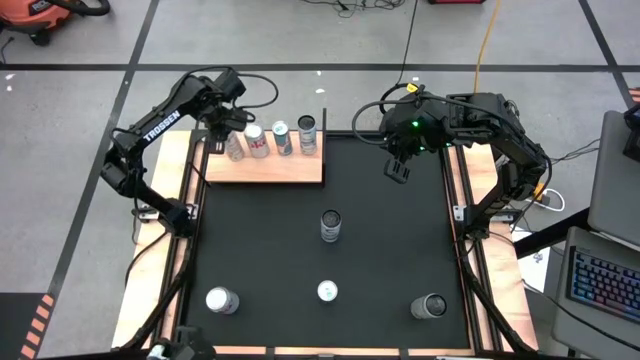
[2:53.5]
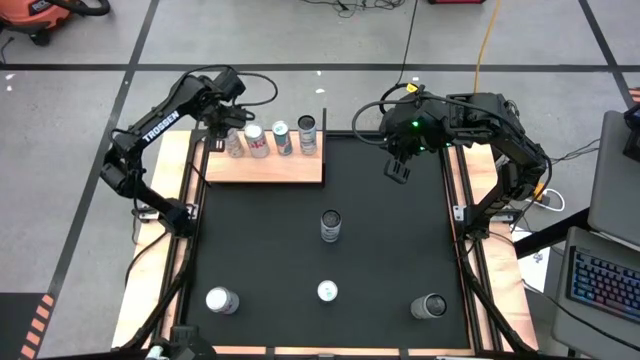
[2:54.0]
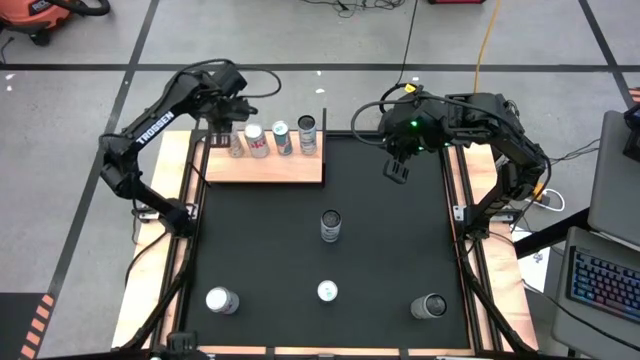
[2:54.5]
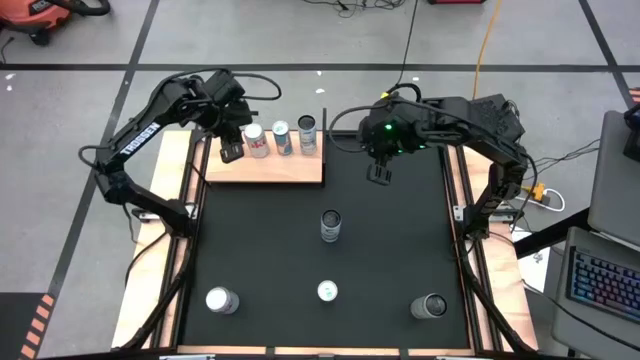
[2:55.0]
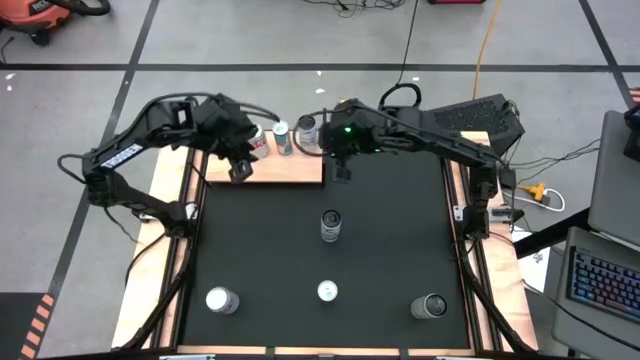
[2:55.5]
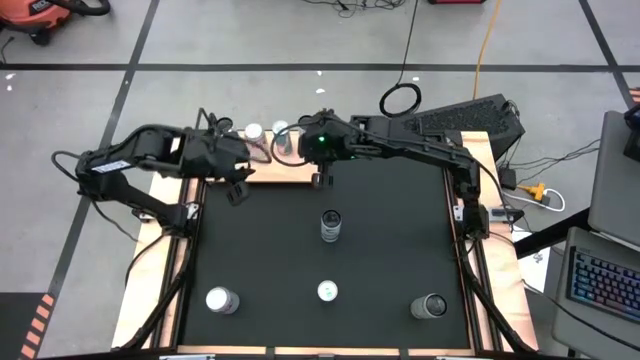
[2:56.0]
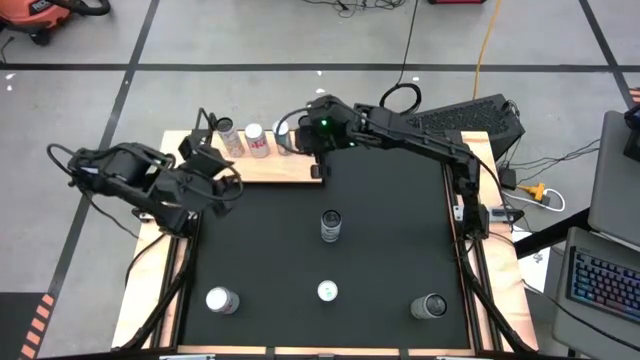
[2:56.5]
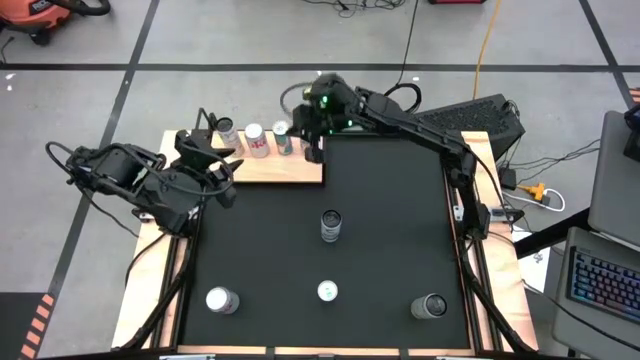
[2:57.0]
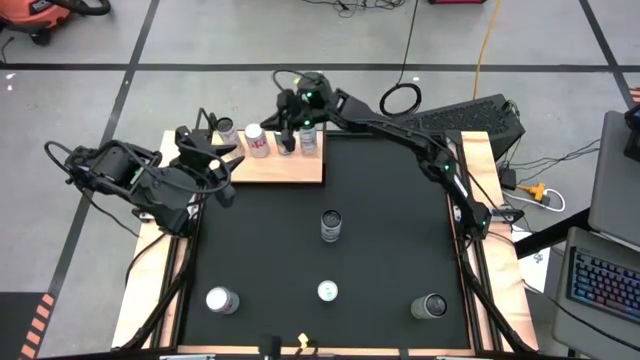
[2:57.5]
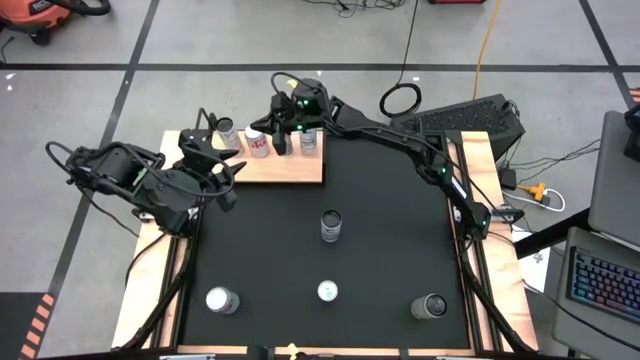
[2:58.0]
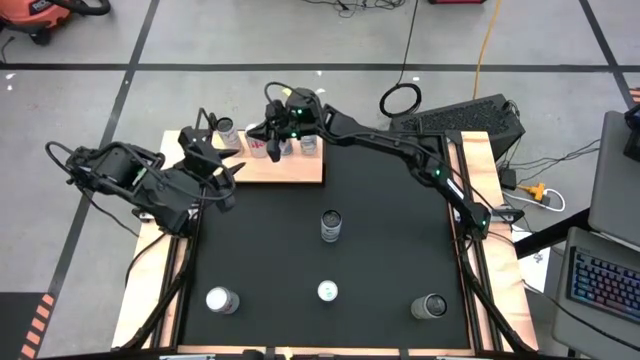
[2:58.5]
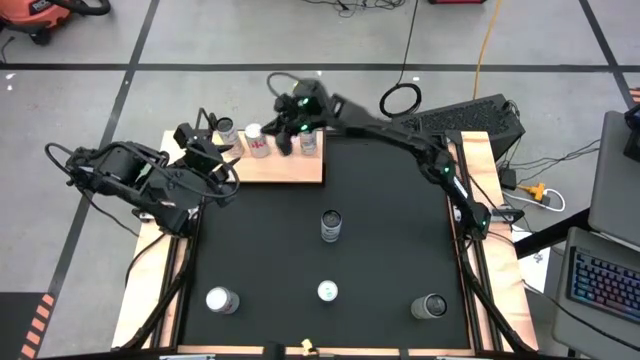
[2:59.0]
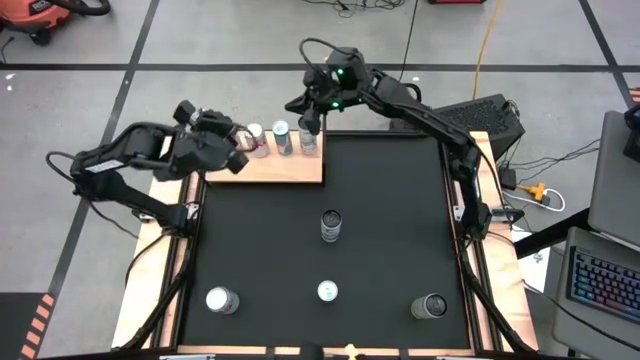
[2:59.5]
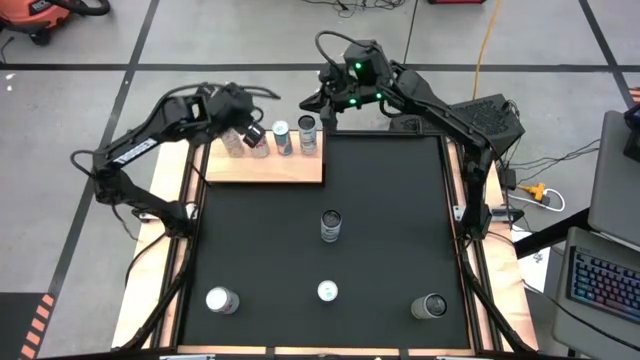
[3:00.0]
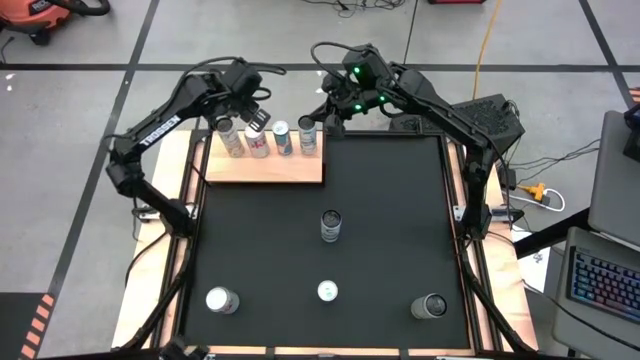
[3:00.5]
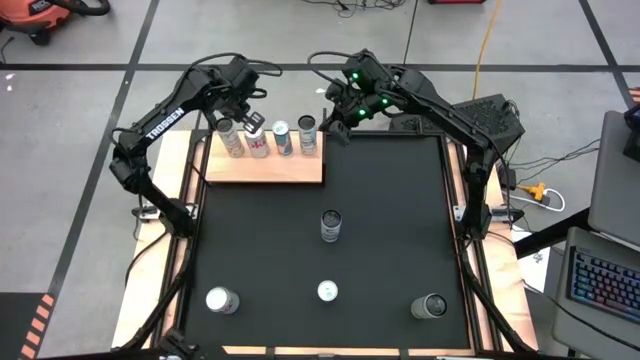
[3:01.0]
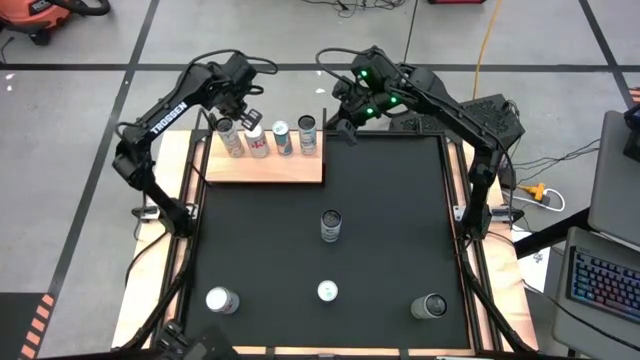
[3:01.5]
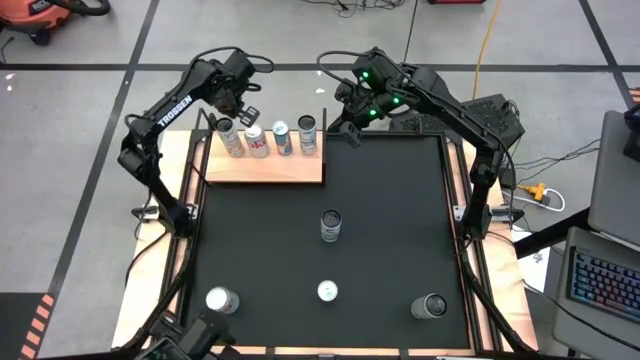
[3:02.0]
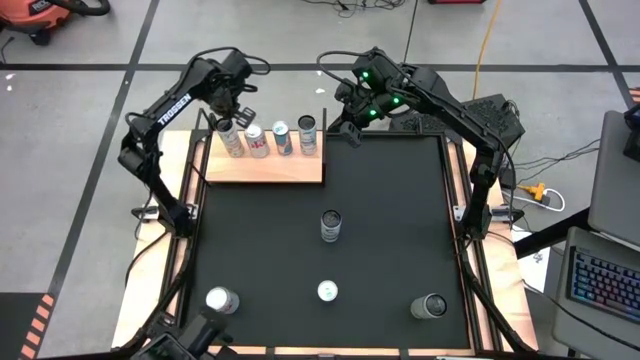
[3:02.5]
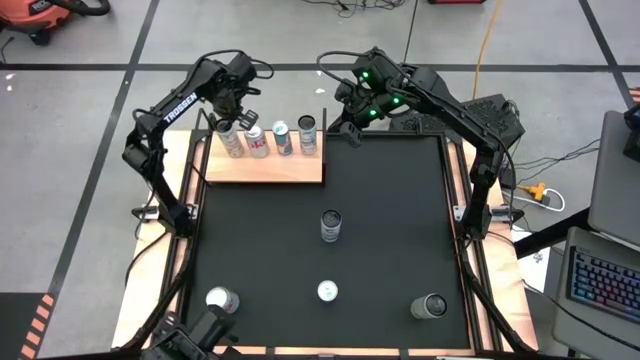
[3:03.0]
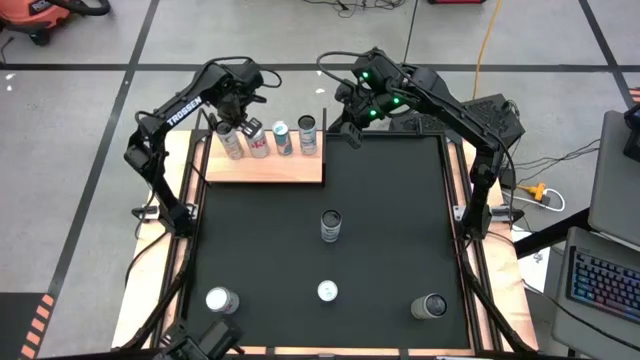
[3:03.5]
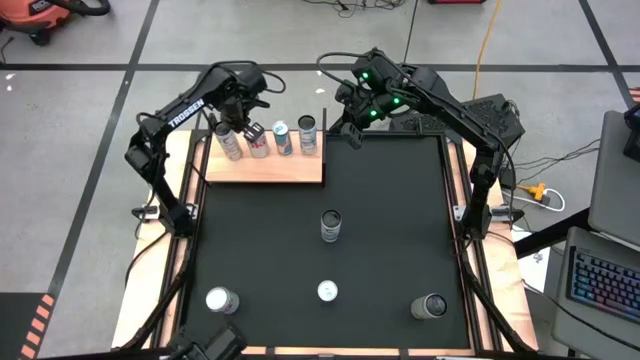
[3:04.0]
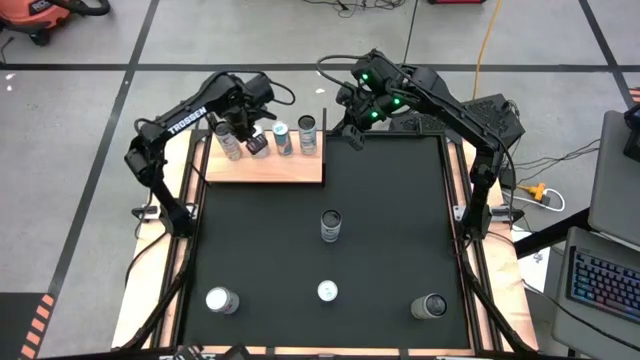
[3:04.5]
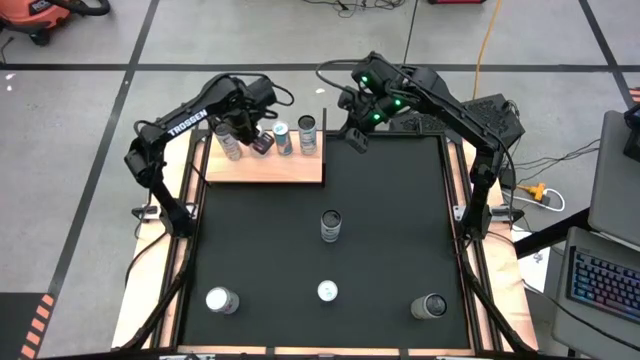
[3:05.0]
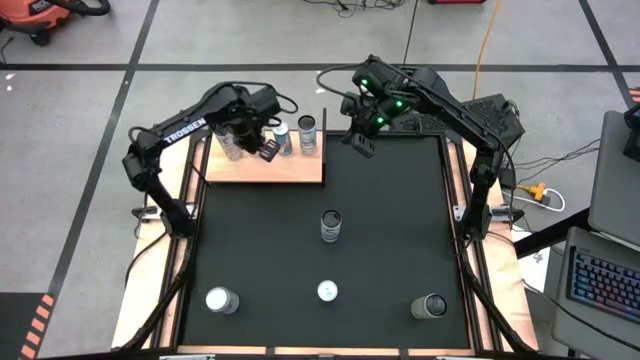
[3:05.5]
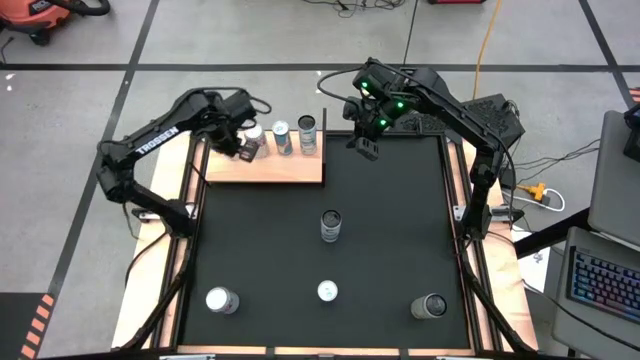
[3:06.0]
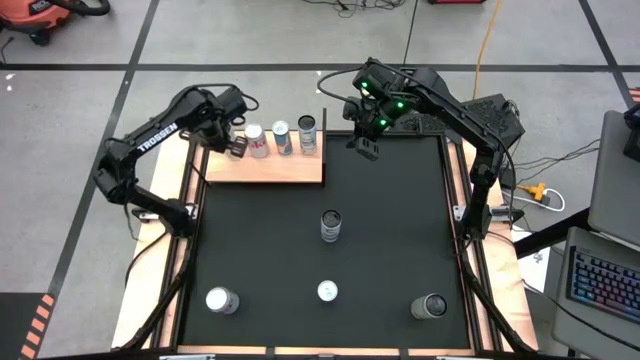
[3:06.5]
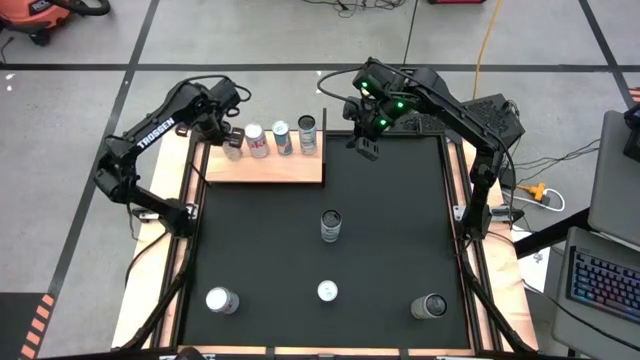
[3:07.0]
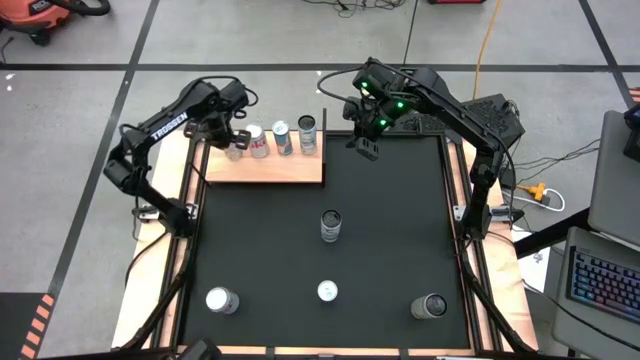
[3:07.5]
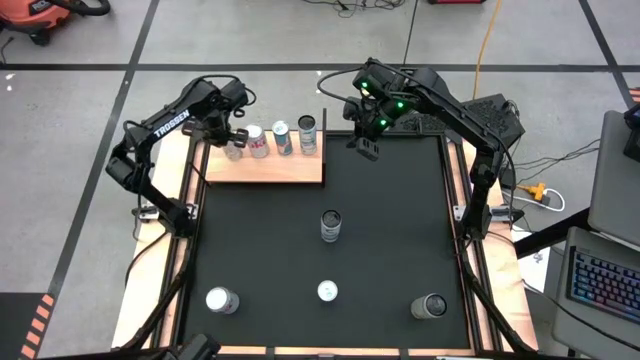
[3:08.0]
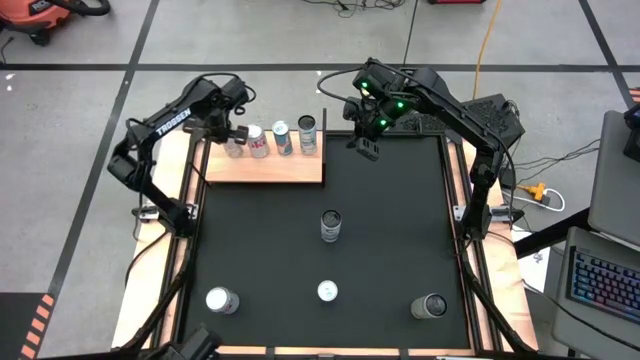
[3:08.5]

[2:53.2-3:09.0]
Task: Place canned beverage on shelf
Put the top white-yellow soda can on the shelf

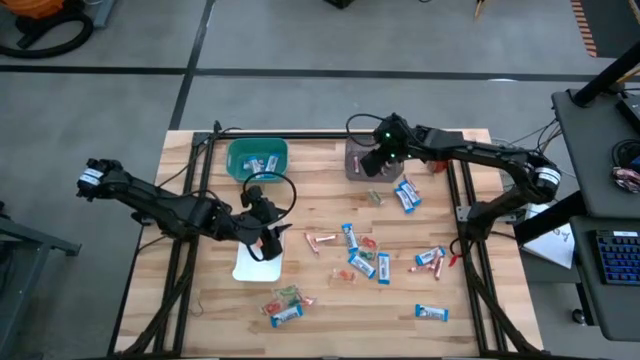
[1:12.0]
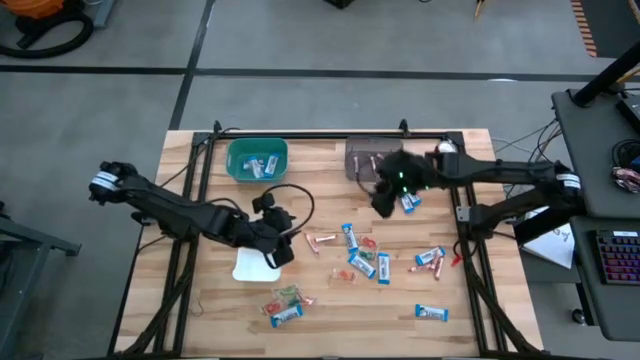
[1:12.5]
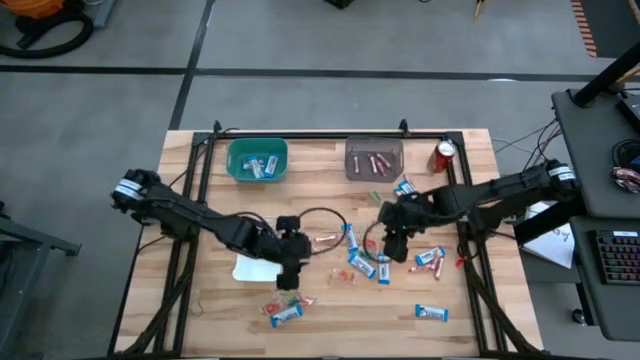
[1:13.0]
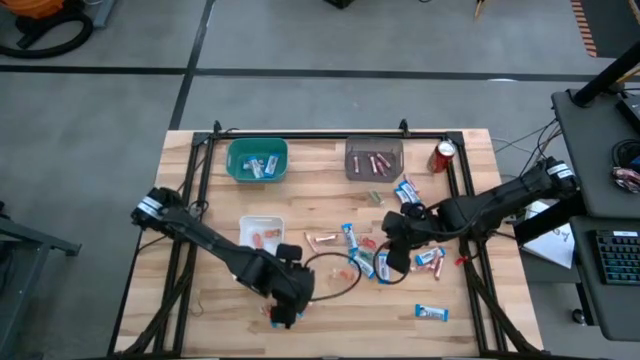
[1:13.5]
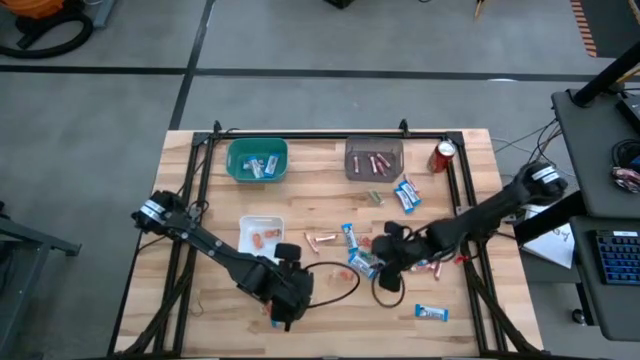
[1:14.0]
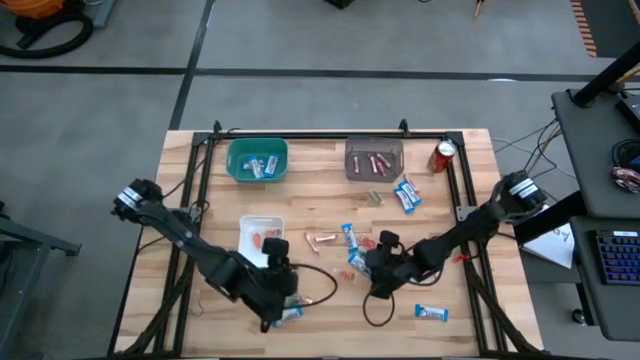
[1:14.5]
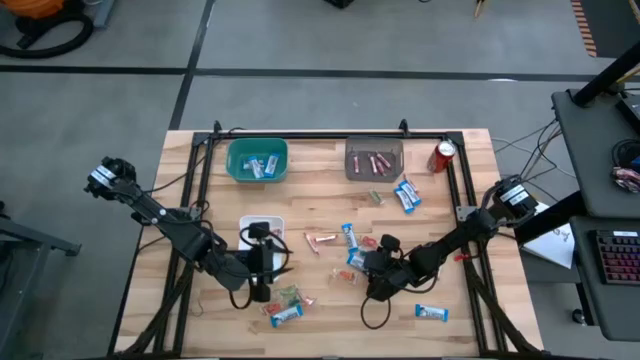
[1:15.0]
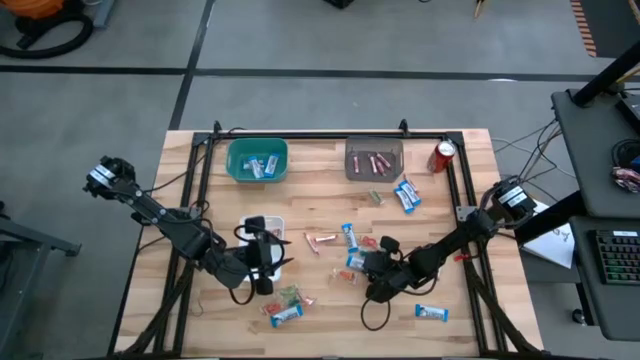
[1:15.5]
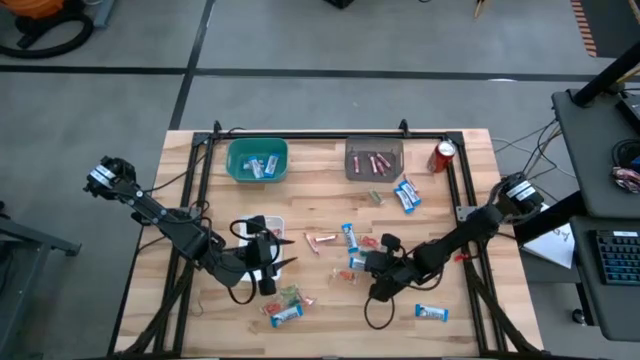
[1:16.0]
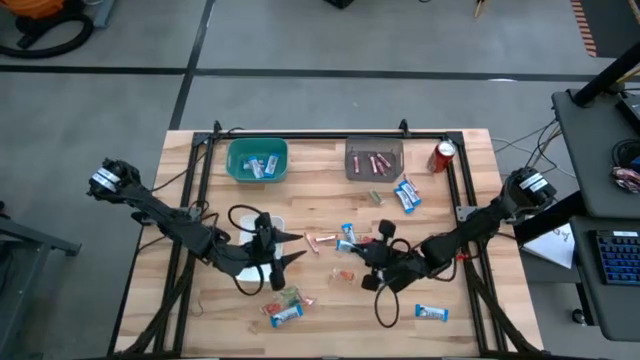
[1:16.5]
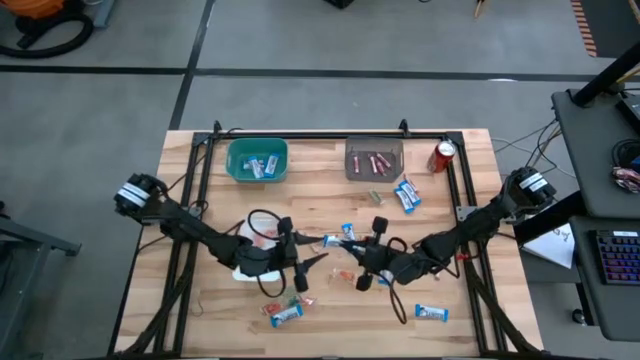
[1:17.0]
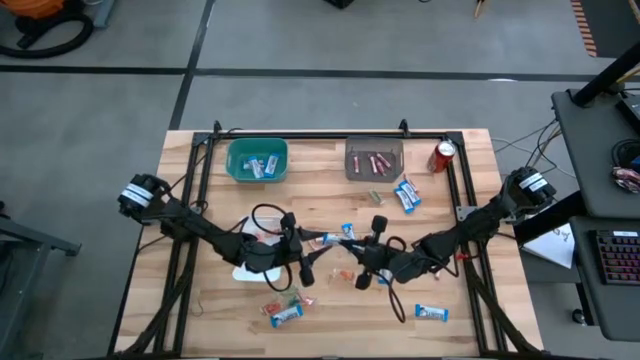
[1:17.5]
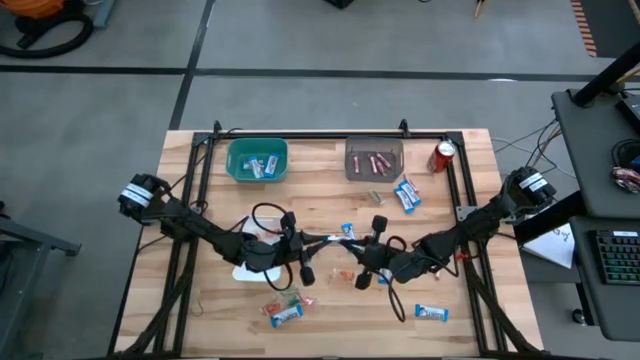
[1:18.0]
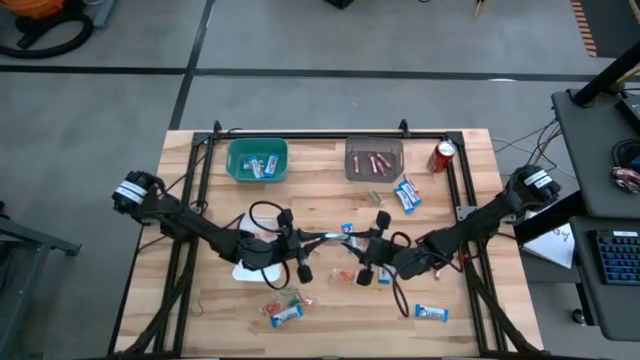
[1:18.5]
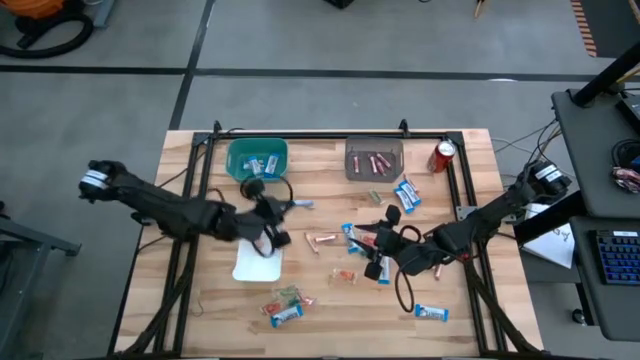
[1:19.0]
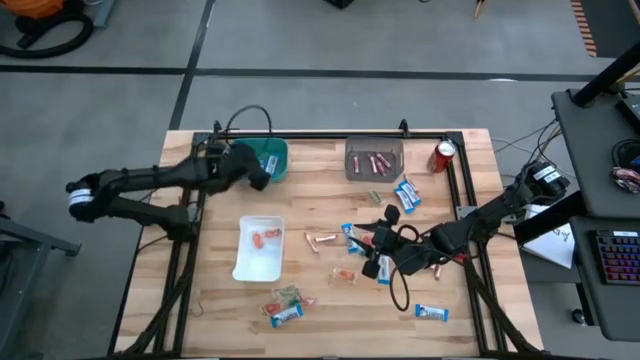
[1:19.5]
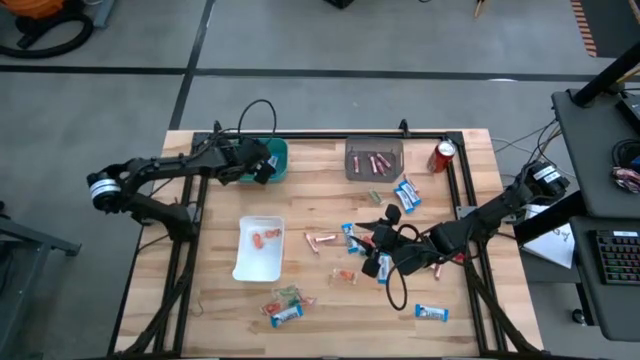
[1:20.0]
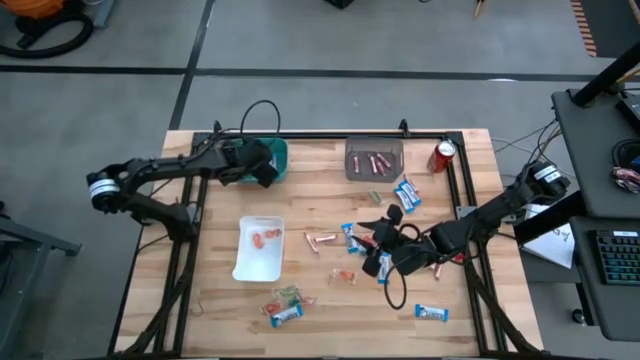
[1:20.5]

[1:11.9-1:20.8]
Task: Sort candy
Put the white chocolate bar into the green bin
